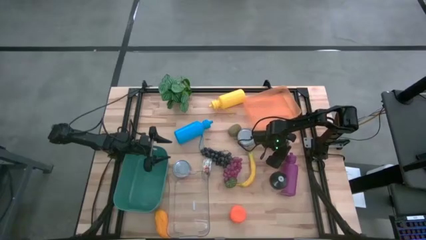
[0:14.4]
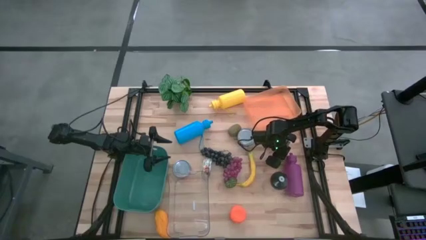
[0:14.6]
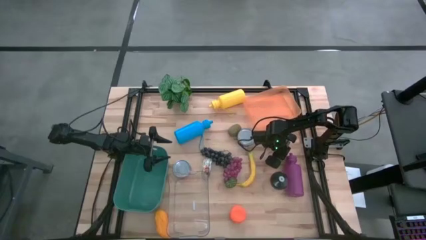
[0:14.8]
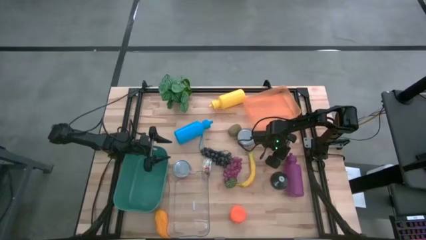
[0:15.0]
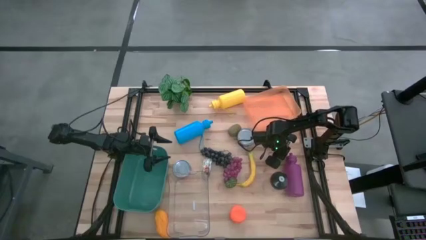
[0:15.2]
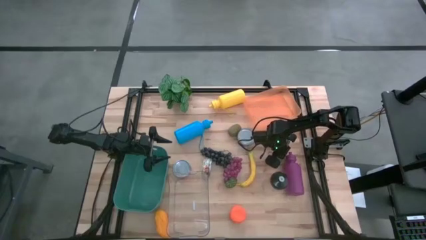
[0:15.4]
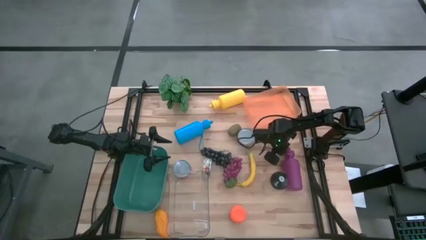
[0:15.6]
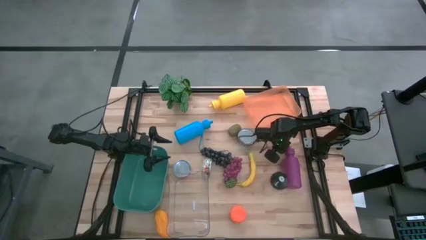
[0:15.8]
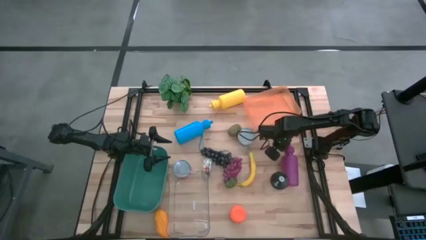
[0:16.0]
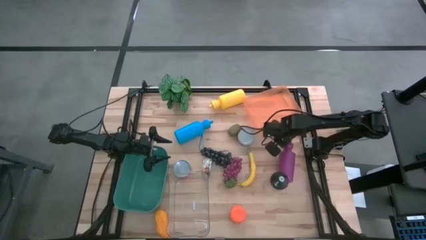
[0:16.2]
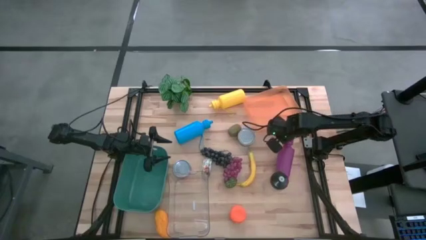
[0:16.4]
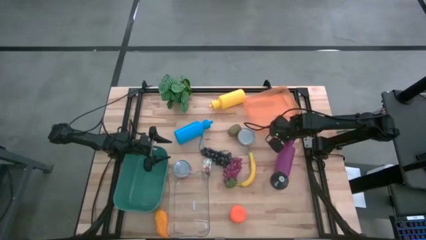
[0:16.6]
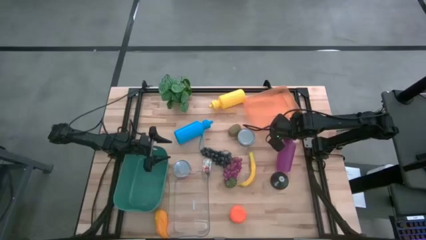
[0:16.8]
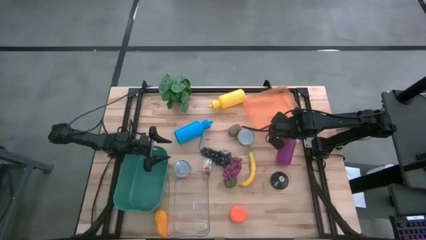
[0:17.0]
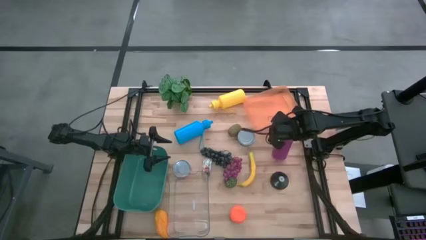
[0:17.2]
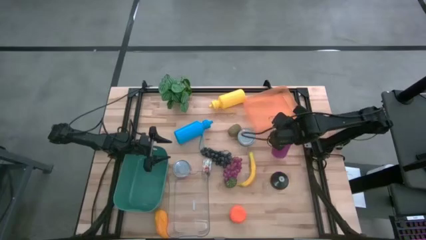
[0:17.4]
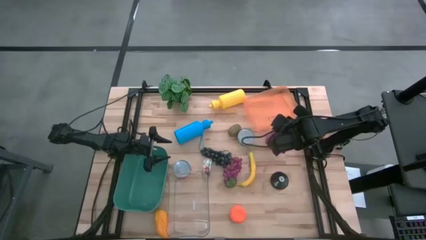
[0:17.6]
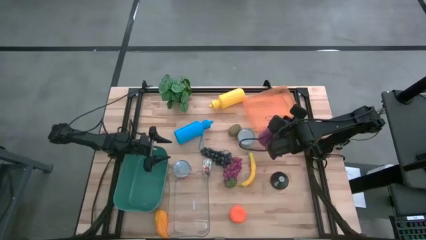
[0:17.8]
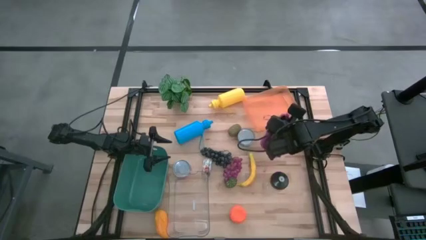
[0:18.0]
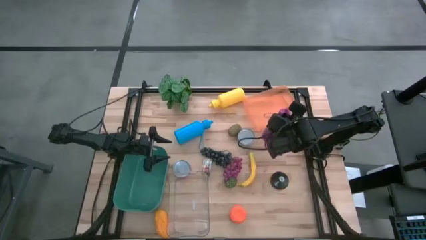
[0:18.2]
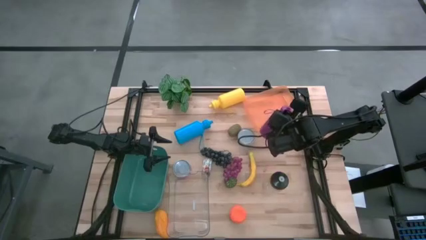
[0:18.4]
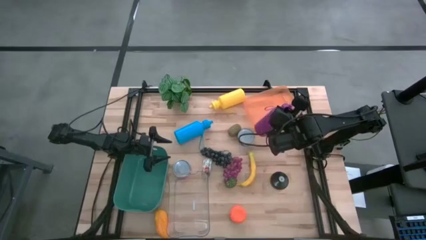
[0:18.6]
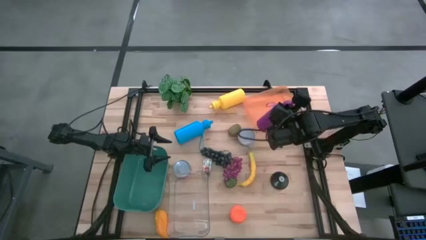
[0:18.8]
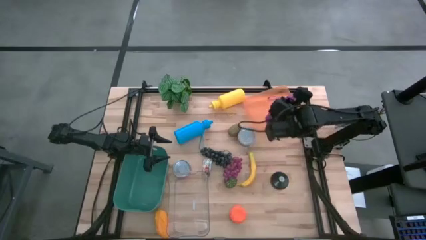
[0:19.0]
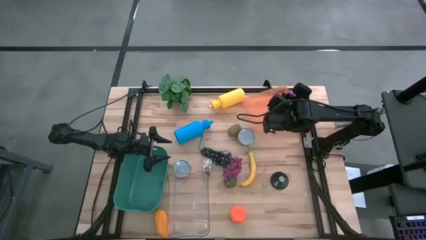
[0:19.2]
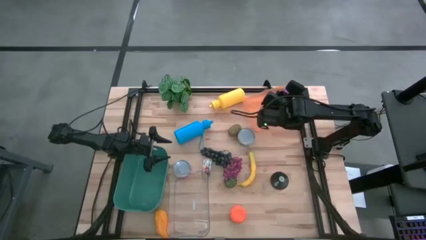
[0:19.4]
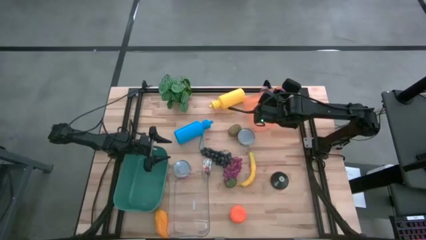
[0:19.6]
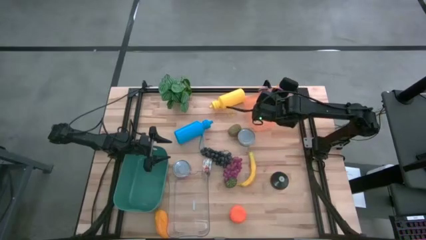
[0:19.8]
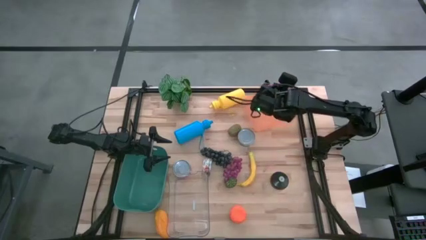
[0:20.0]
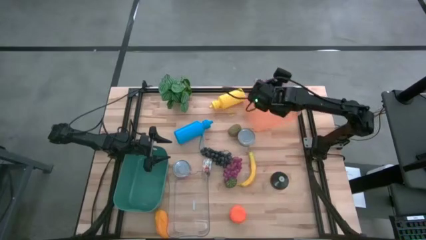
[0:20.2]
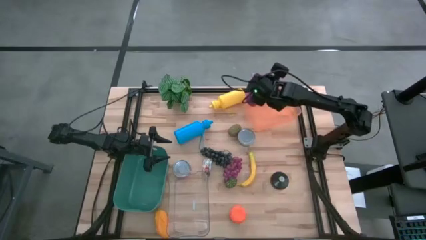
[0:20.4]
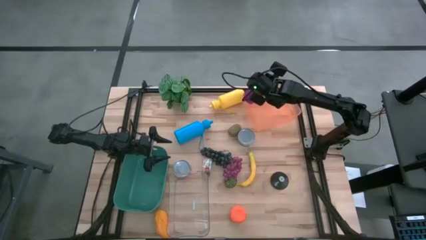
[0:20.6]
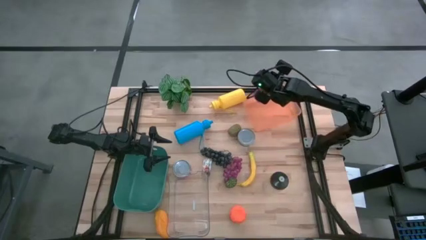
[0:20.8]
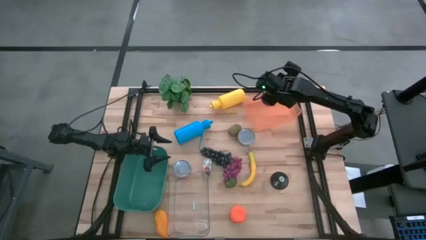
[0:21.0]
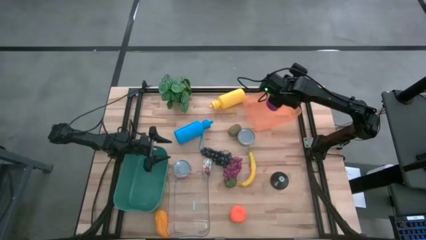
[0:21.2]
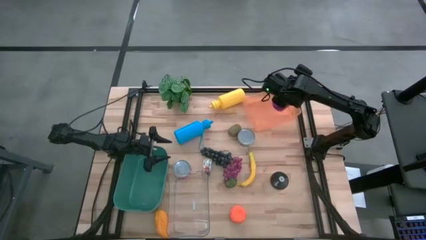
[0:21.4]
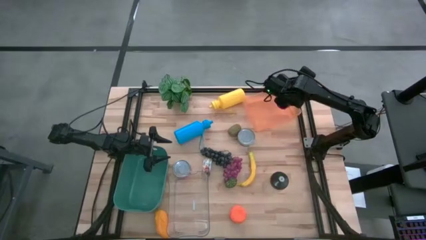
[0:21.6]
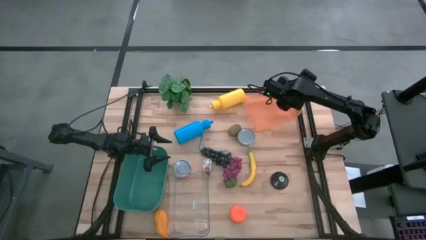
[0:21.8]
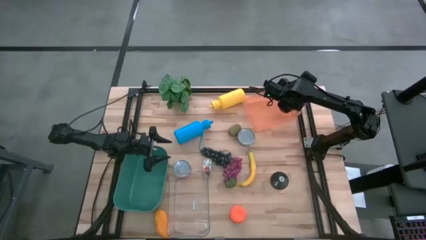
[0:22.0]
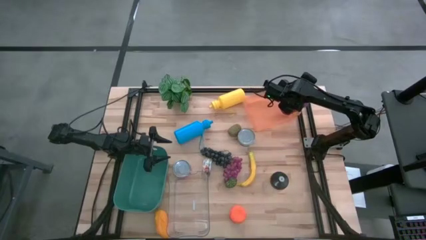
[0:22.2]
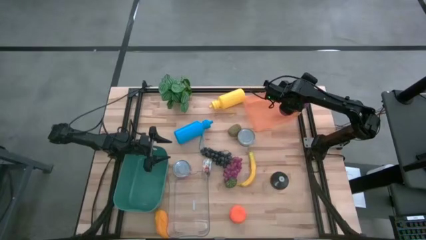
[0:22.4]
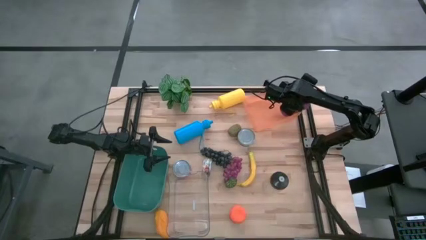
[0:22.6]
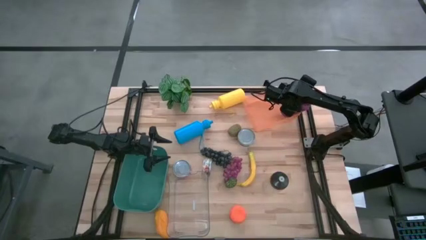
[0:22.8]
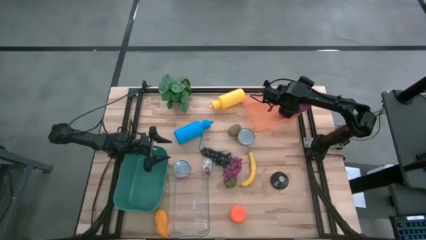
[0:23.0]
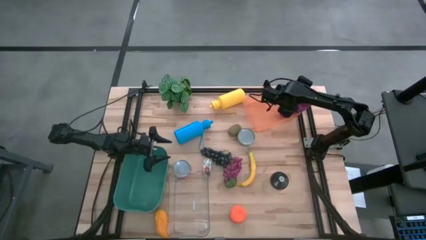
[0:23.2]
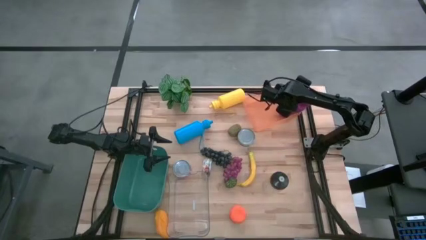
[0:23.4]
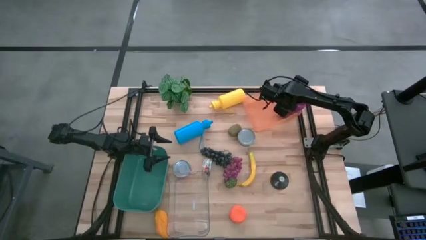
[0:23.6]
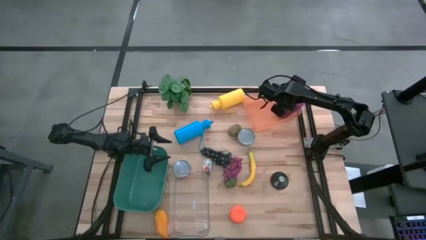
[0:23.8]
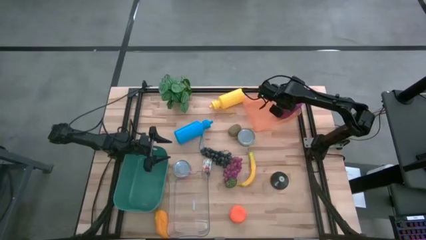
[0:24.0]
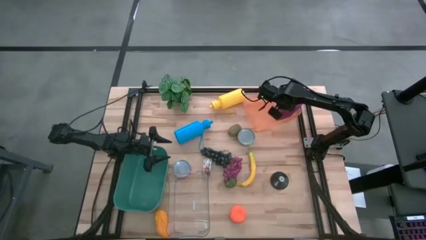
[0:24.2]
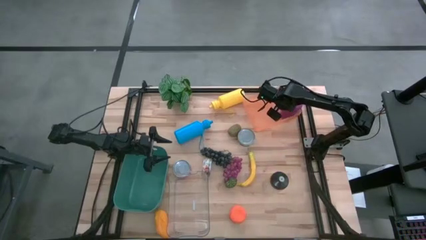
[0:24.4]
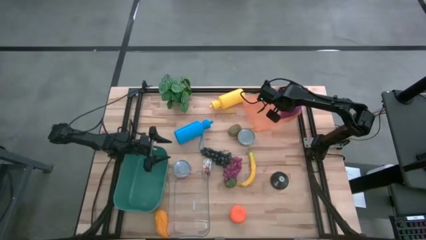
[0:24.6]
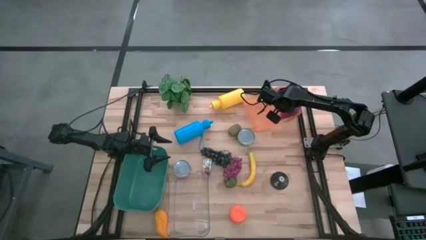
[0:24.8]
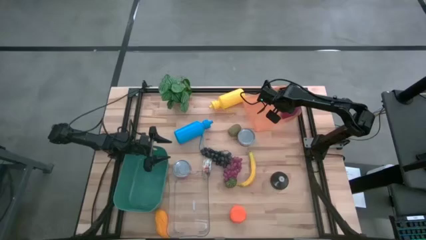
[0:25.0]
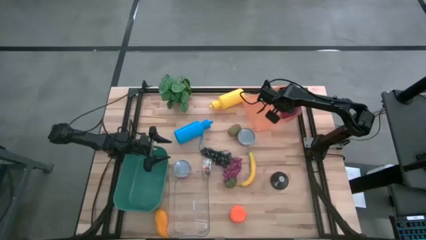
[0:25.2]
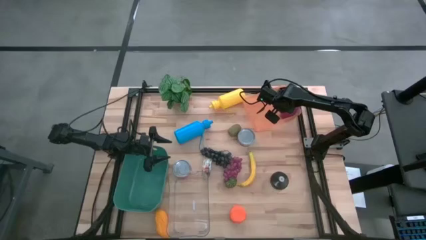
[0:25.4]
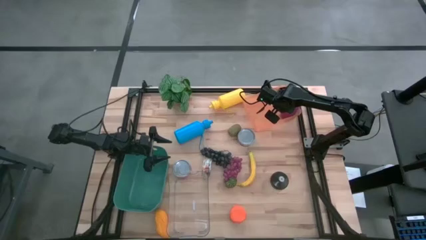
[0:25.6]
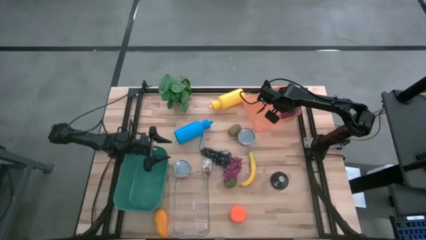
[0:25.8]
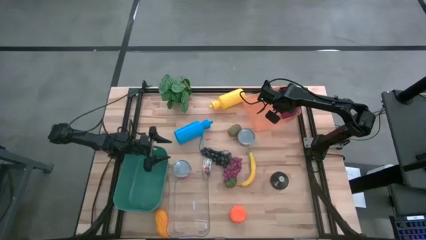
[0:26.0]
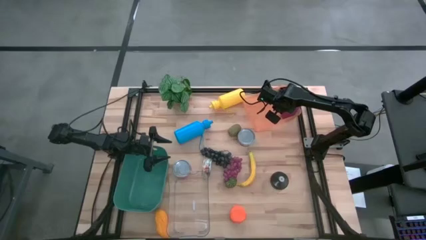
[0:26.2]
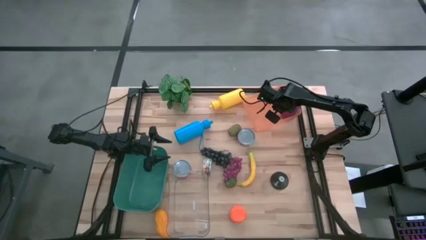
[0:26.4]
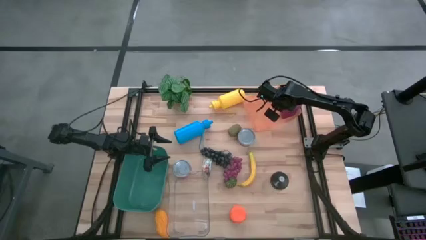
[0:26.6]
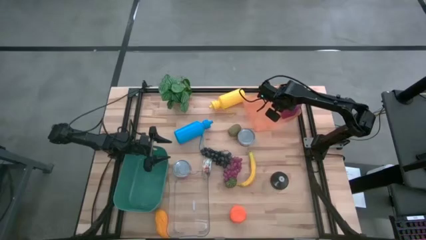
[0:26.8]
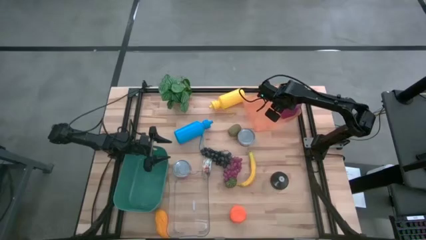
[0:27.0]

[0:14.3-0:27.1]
Task: Pick & Place Food Item
Put the purple tumbler into the orange bin
